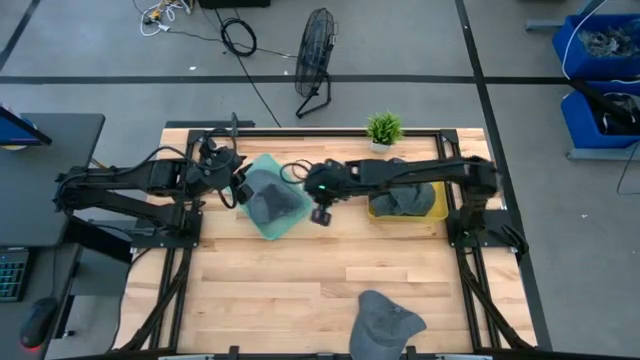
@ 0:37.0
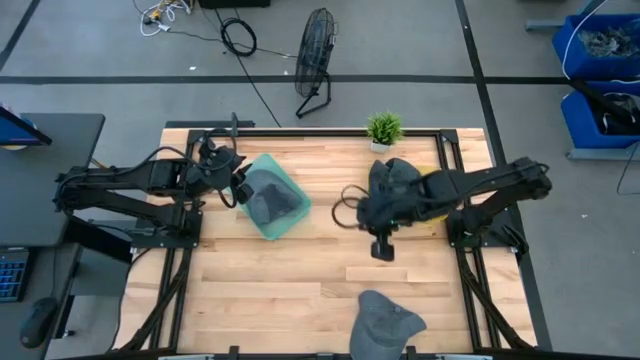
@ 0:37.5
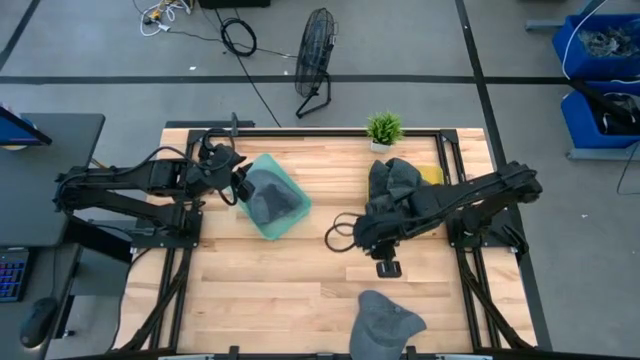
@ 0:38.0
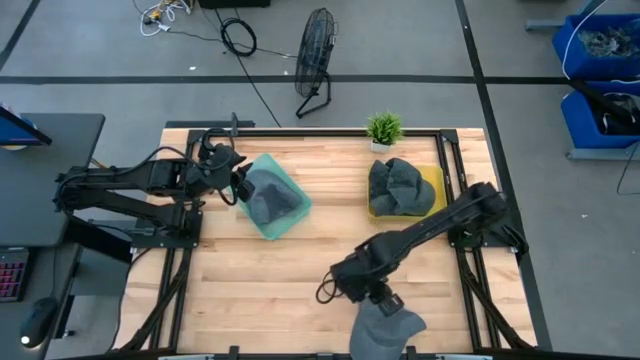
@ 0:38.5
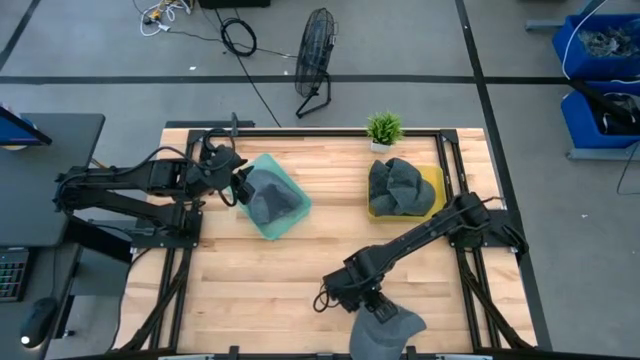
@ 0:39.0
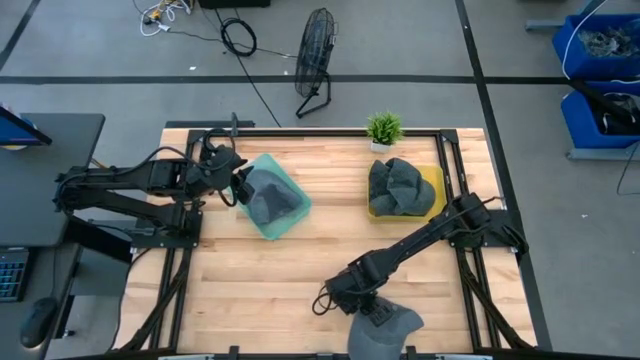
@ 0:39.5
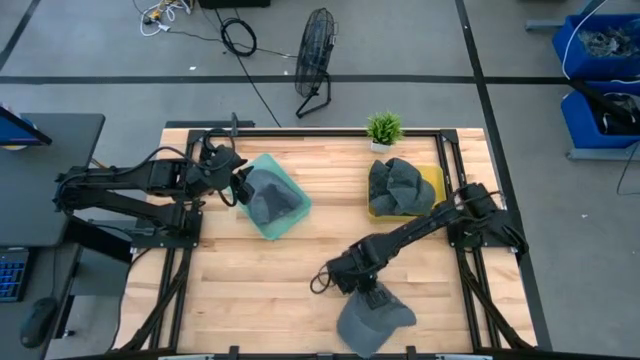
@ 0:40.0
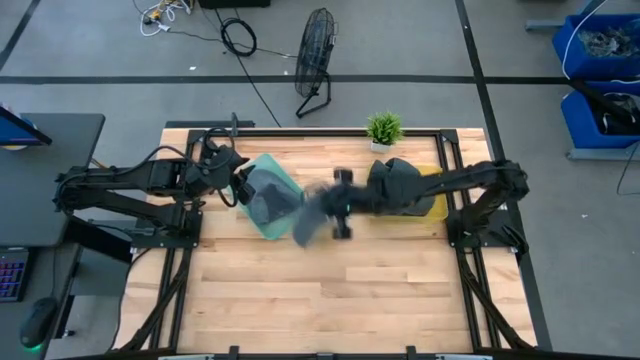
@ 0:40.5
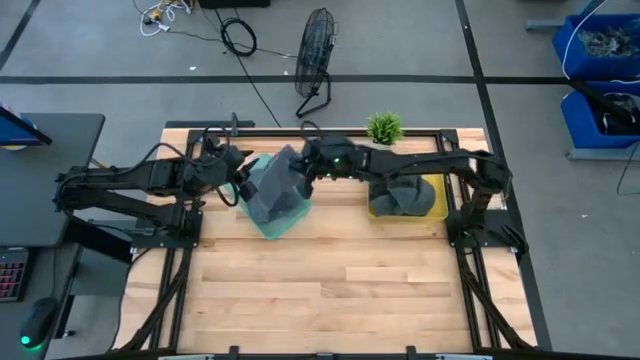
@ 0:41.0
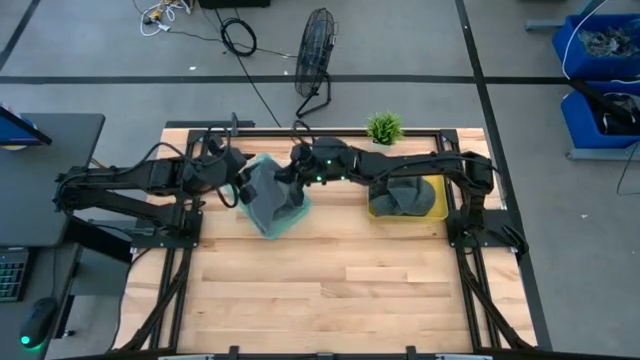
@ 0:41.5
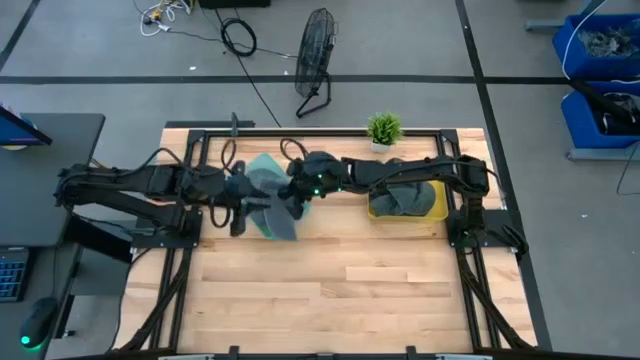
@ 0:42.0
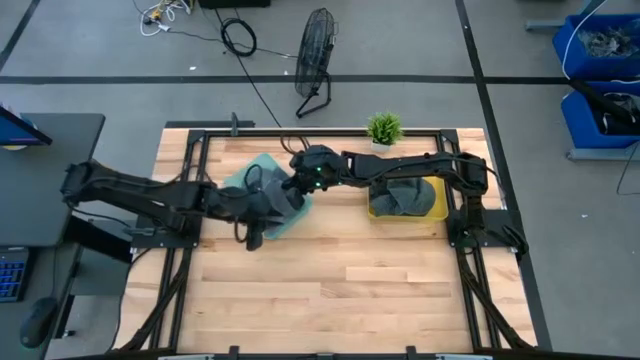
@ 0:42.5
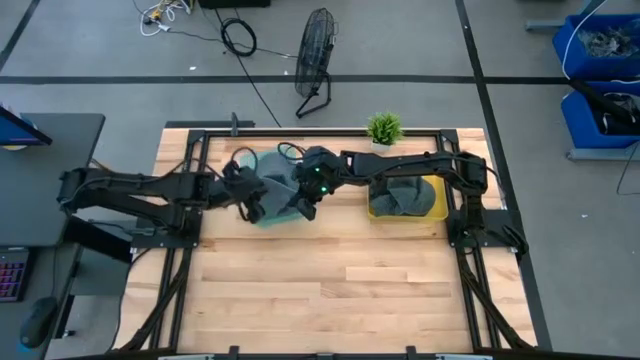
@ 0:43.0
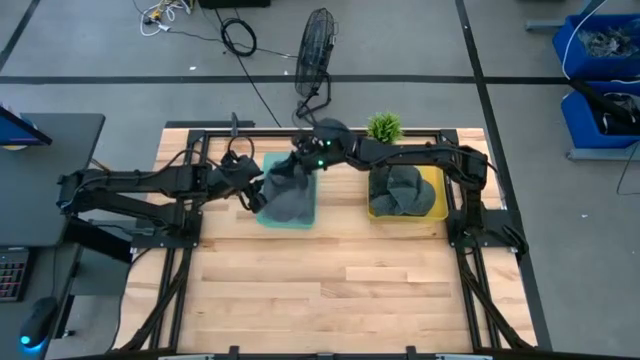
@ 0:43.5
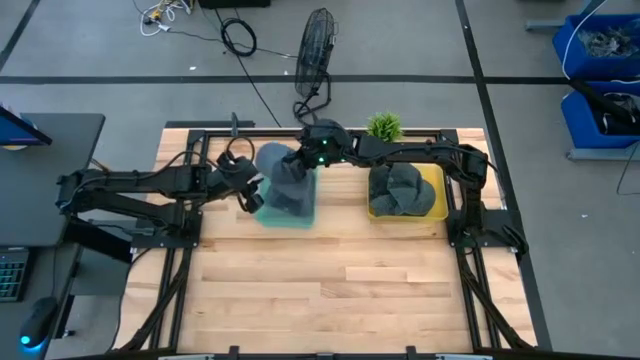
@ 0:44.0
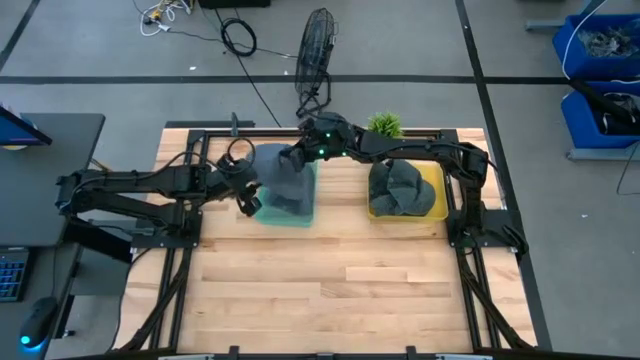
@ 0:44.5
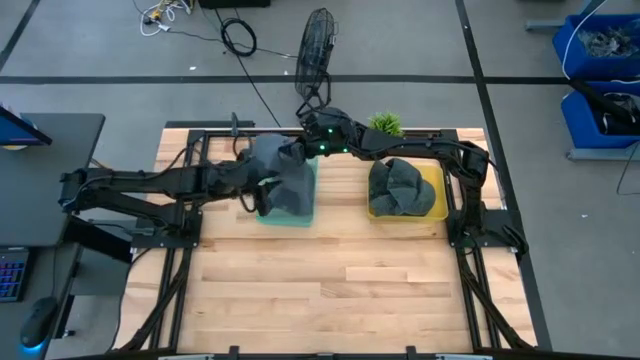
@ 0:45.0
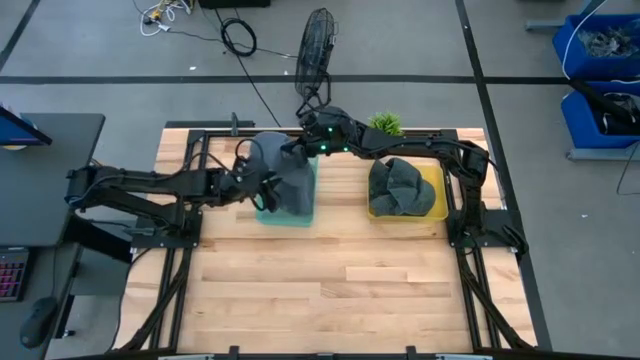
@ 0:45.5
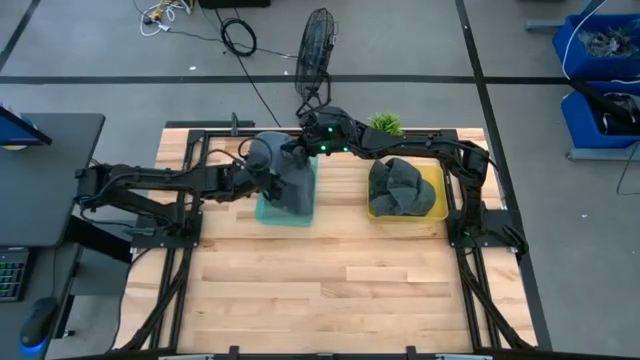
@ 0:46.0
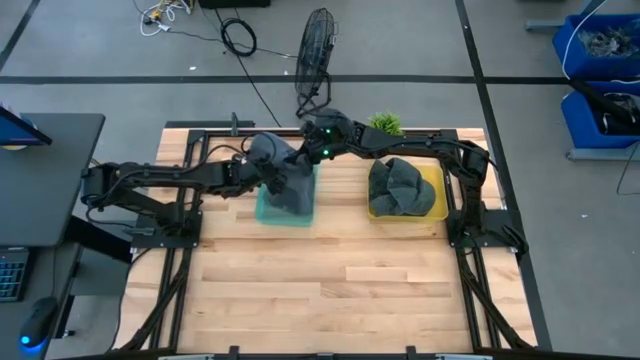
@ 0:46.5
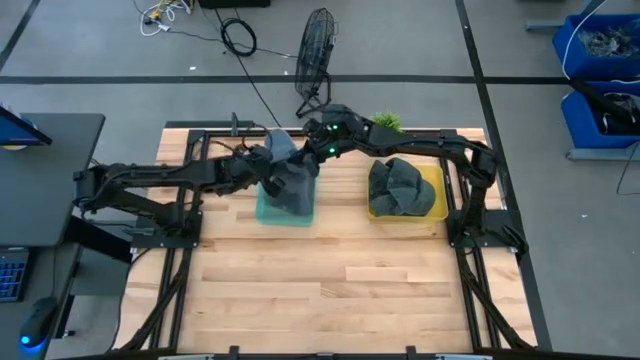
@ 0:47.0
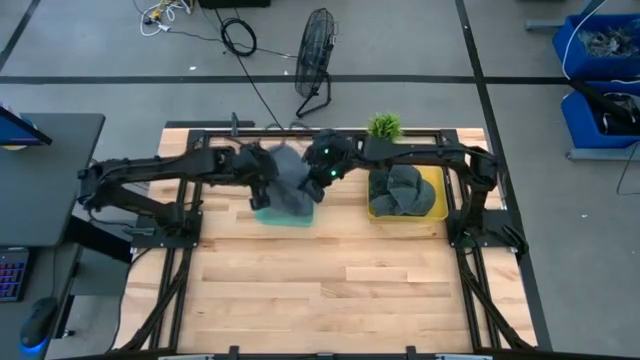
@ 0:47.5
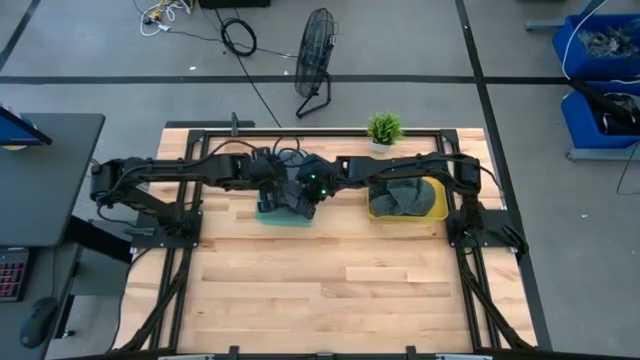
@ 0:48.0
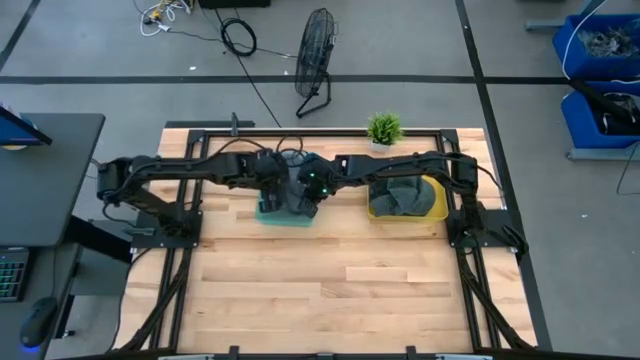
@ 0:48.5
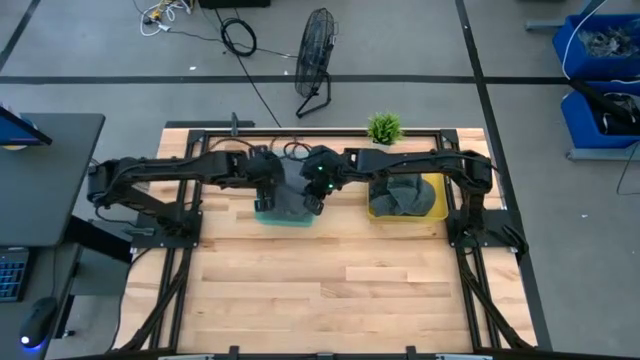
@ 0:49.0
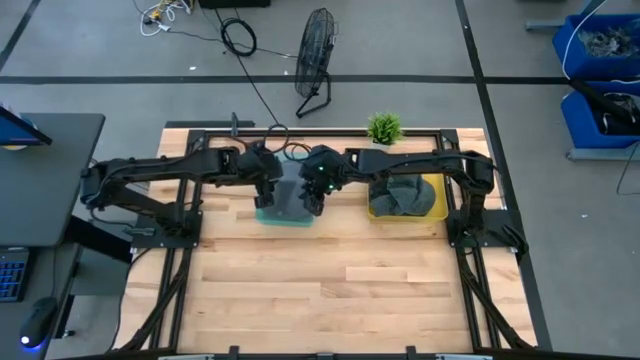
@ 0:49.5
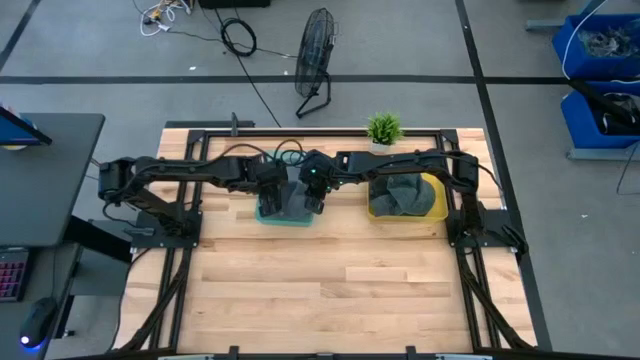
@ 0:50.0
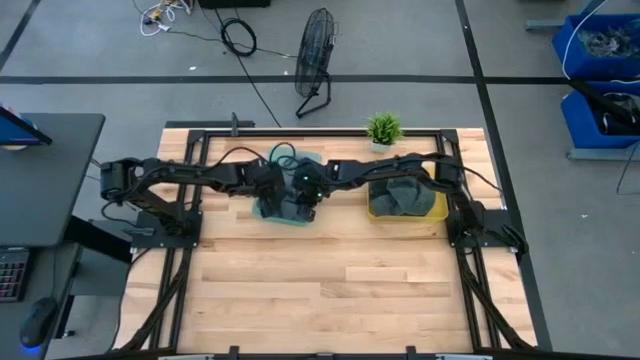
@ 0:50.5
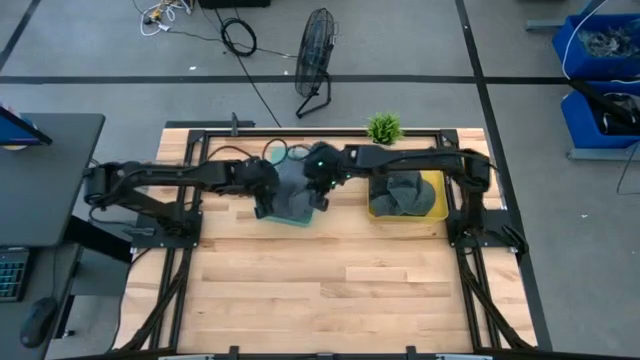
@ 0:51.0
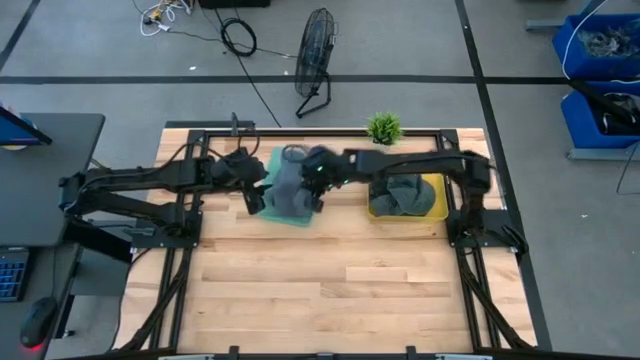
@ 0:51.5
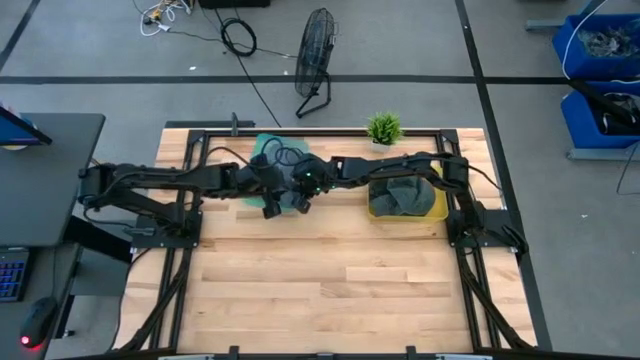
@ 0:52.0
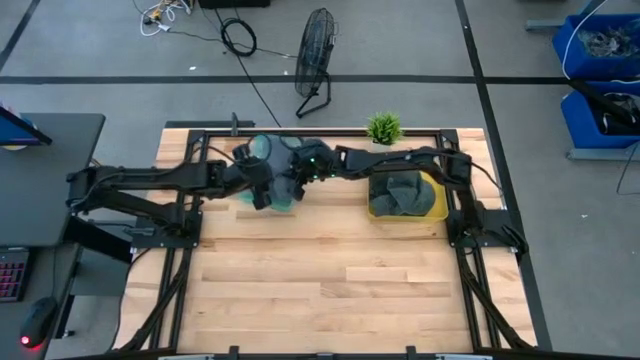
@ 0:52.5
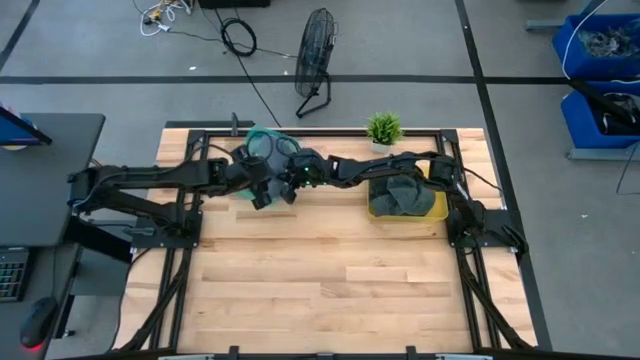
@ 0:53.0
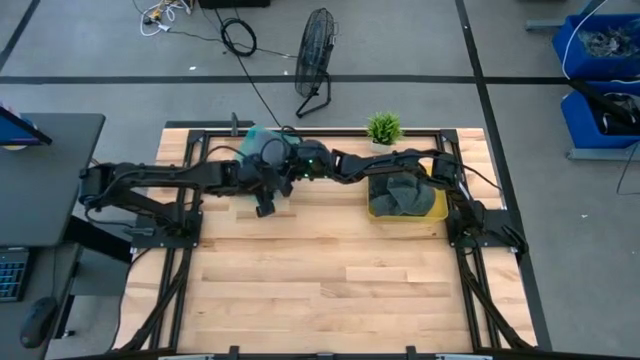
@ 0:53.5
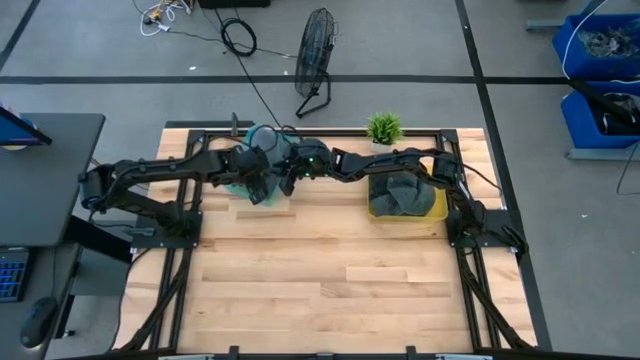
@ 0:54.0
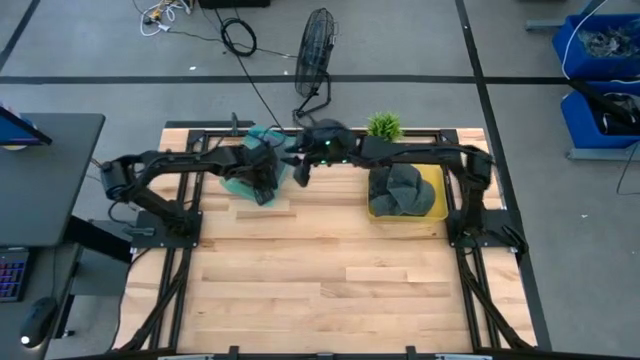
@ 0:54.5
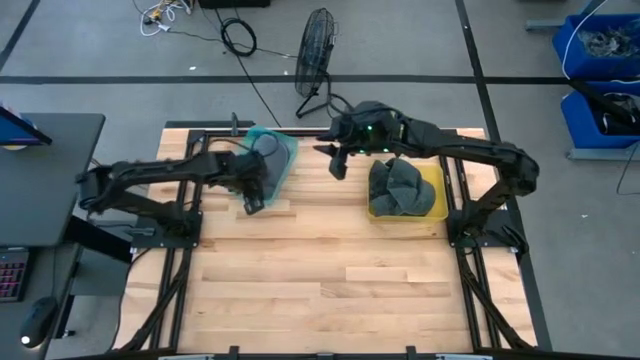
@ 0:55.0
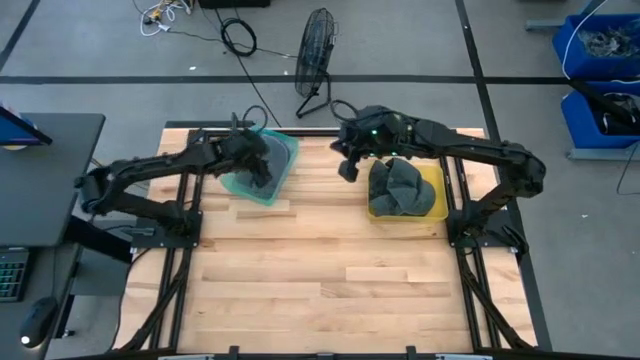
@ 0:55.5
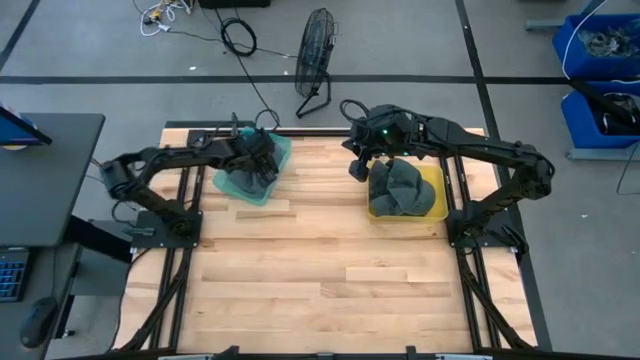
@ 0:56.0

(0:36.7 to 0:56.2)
Task: Pick & Place hat
Put the blue cap into the green bin

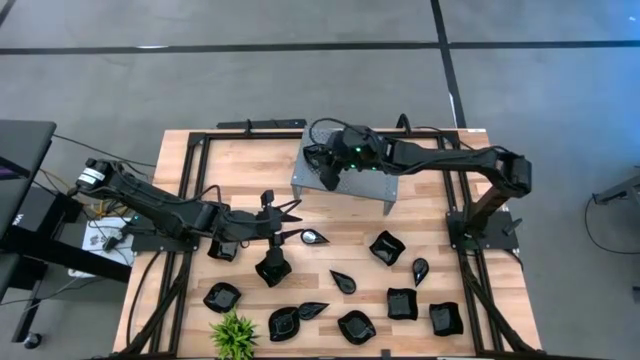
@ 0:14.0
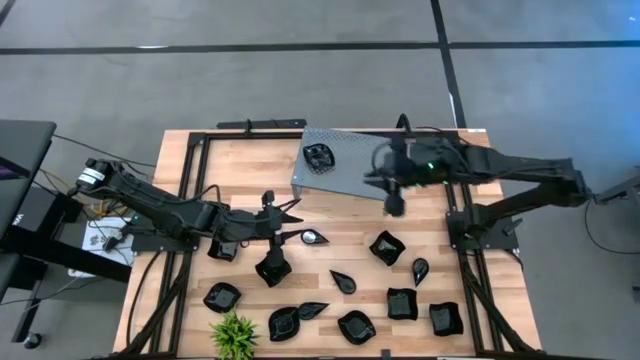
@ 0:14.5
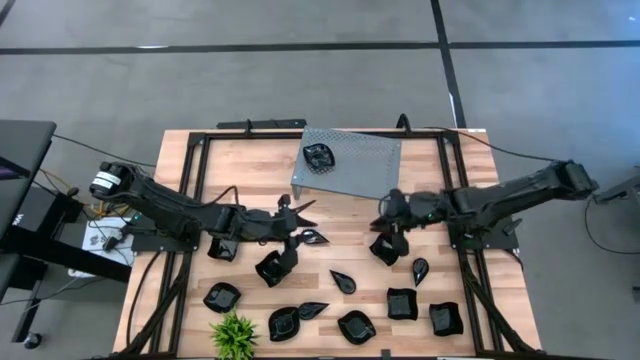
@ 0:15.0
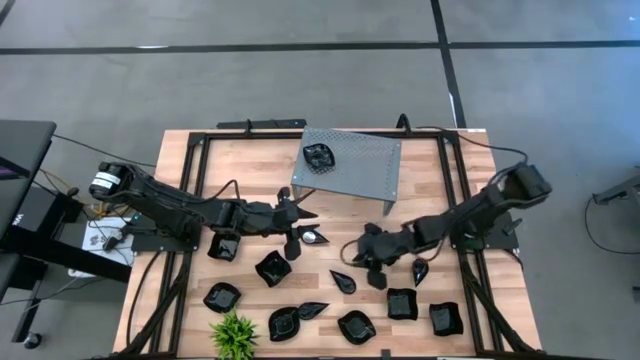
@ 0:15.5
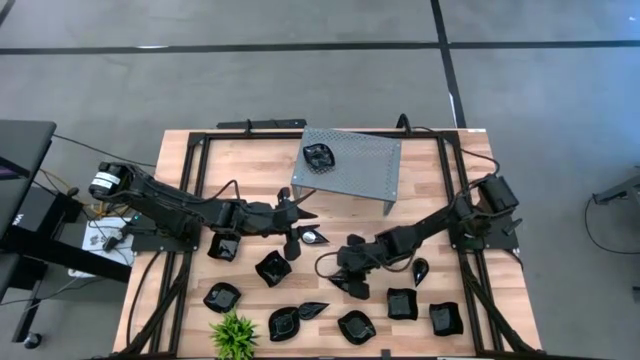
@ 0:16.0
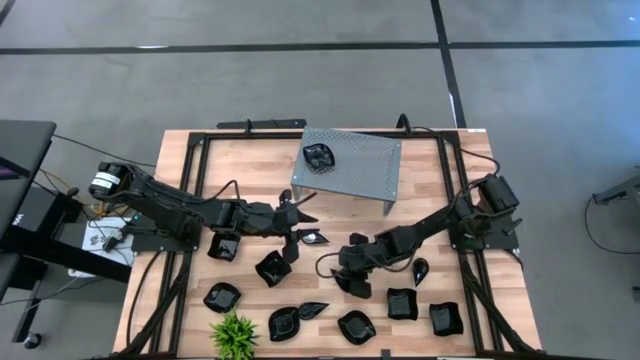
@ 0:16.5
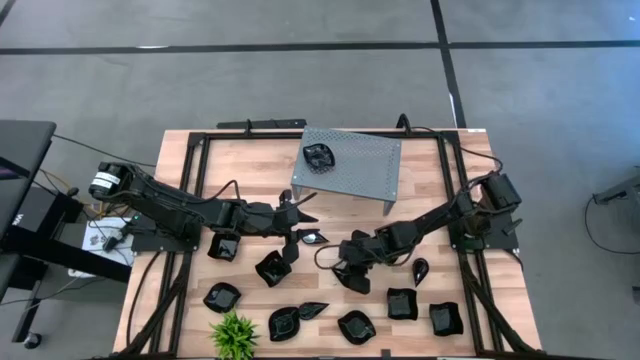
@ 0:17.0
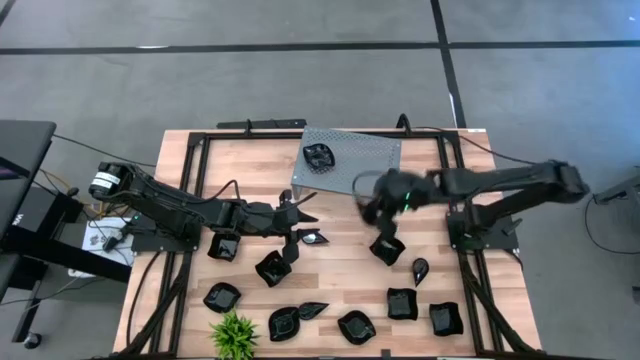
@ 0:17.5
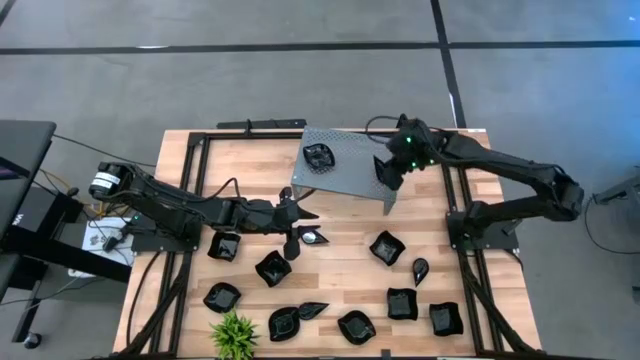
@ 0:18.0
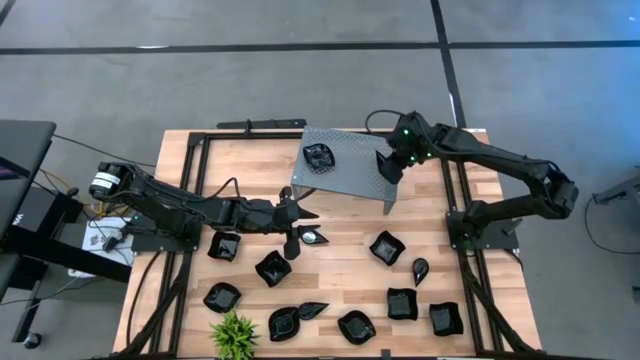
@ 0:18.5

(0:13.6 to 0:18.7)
Task: Pick & Place Mini shaped plates
Put the drop-shaped plate on the shelf
